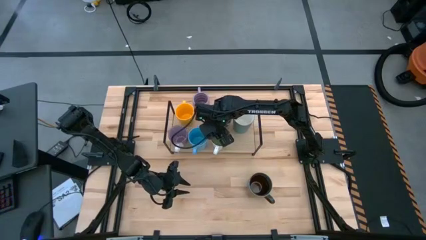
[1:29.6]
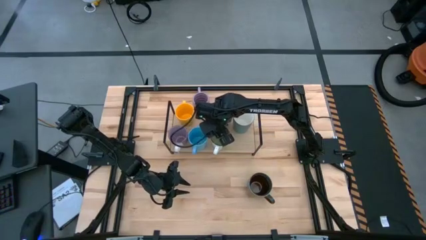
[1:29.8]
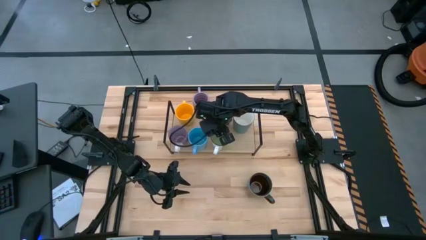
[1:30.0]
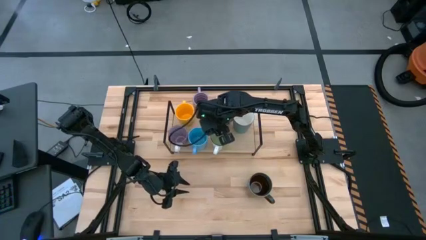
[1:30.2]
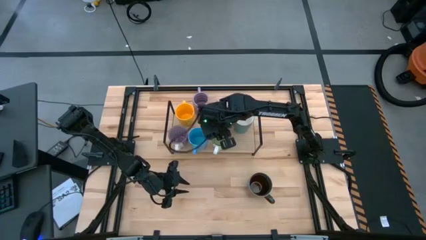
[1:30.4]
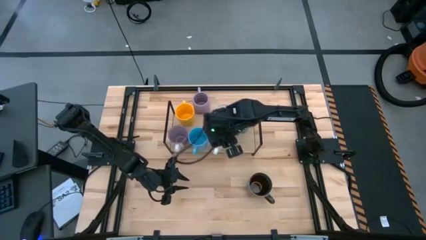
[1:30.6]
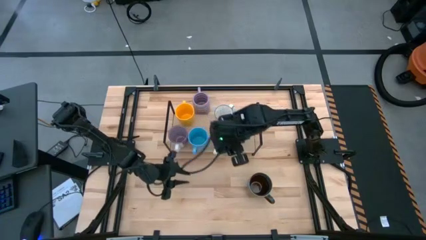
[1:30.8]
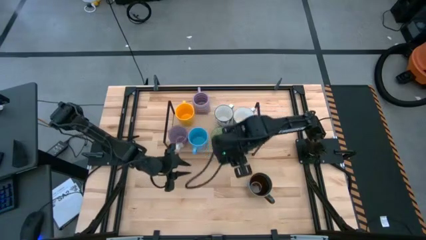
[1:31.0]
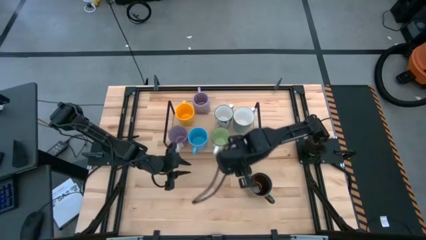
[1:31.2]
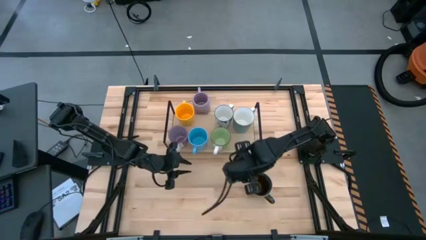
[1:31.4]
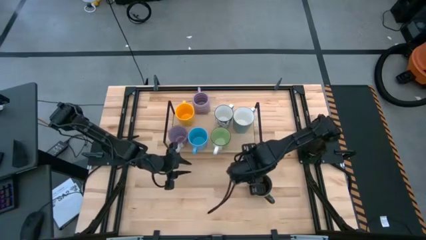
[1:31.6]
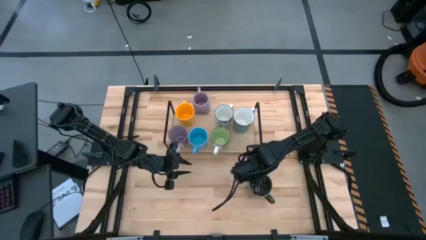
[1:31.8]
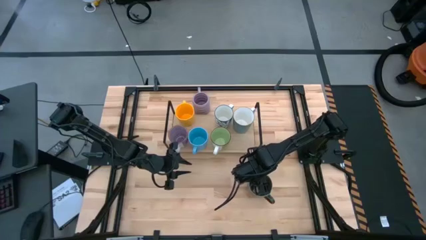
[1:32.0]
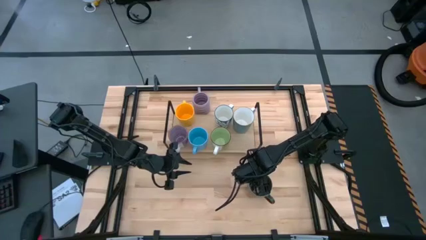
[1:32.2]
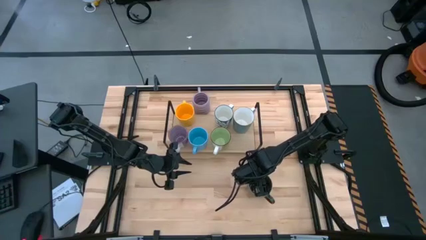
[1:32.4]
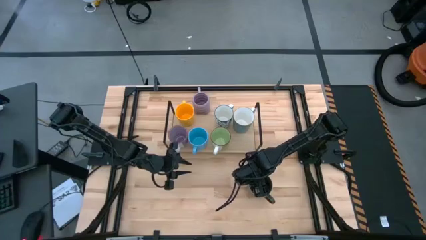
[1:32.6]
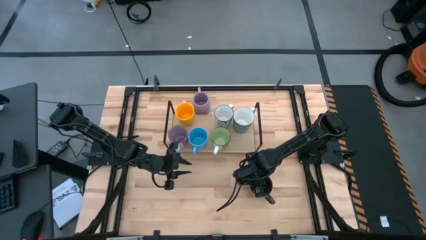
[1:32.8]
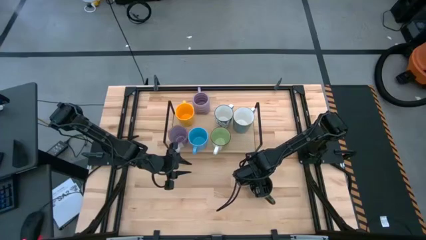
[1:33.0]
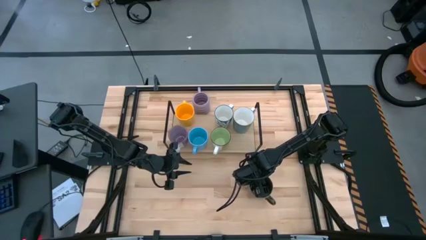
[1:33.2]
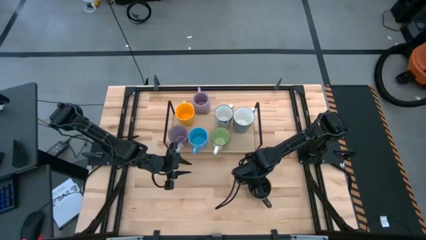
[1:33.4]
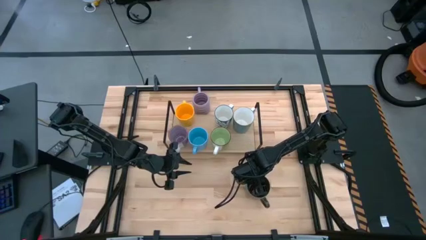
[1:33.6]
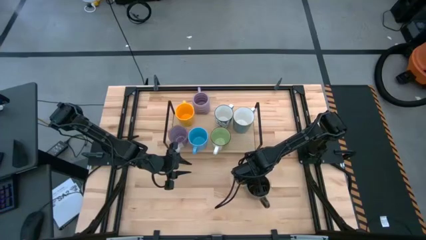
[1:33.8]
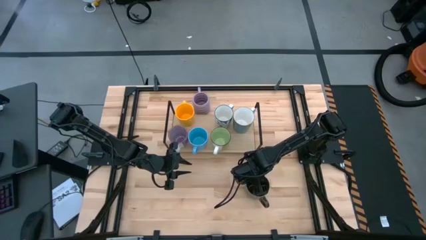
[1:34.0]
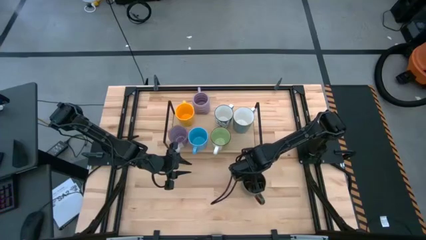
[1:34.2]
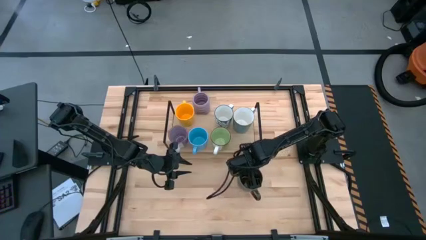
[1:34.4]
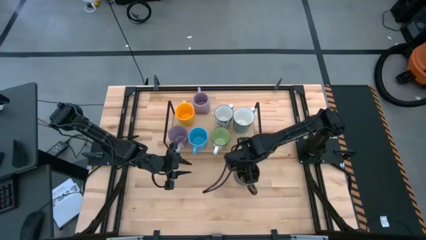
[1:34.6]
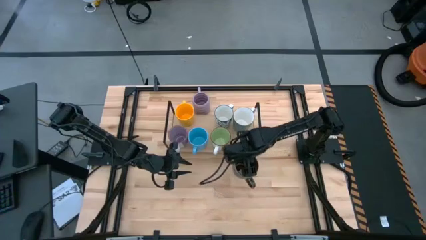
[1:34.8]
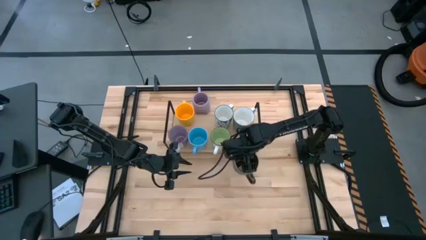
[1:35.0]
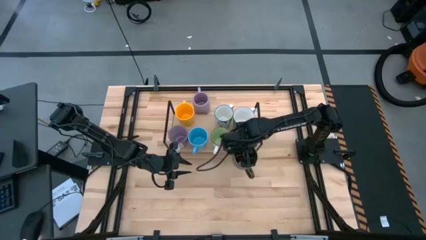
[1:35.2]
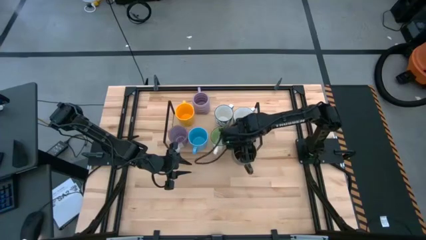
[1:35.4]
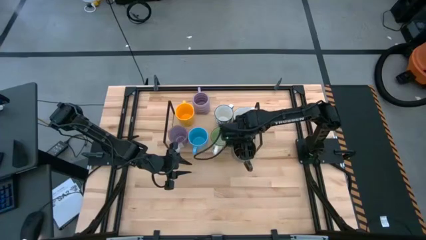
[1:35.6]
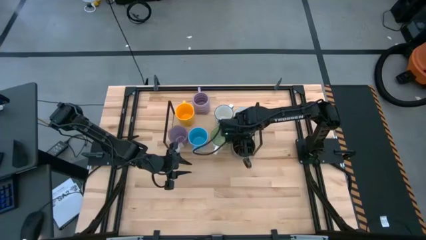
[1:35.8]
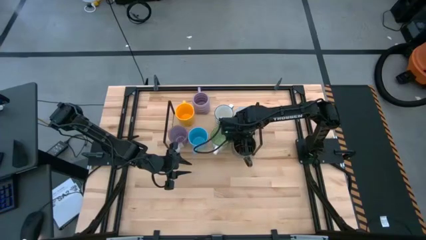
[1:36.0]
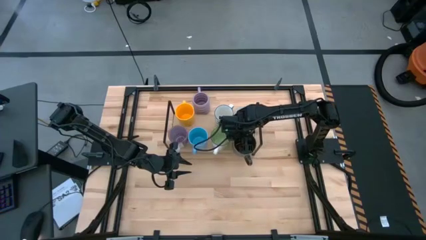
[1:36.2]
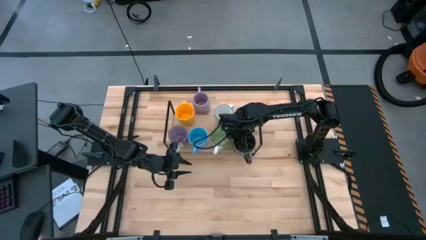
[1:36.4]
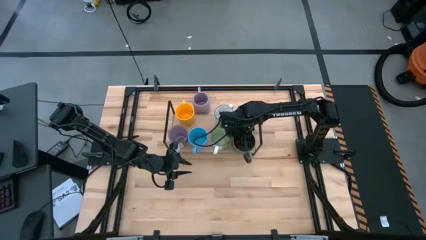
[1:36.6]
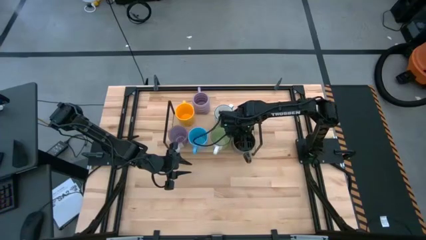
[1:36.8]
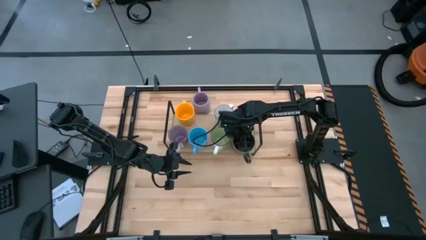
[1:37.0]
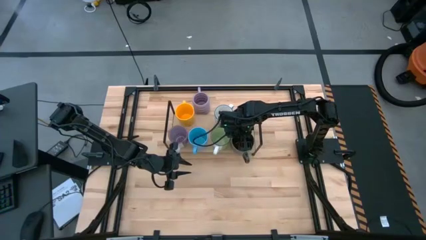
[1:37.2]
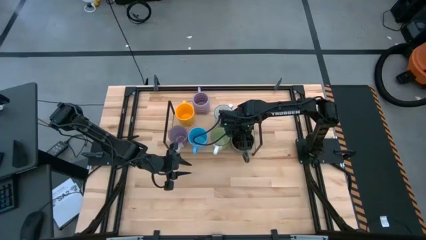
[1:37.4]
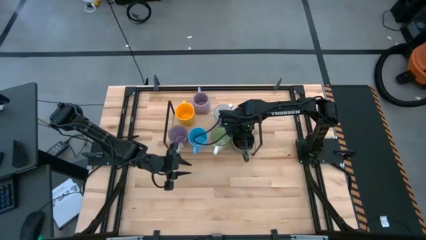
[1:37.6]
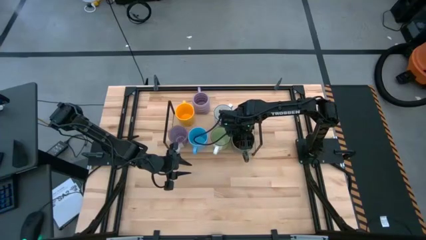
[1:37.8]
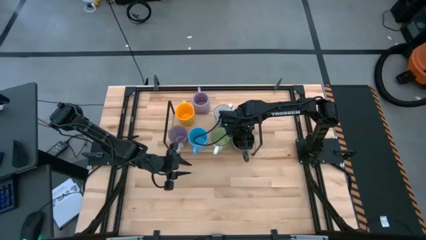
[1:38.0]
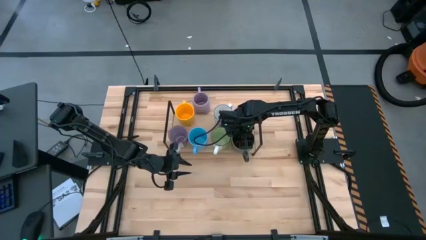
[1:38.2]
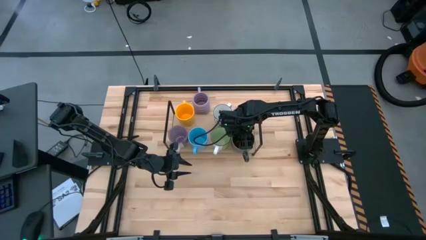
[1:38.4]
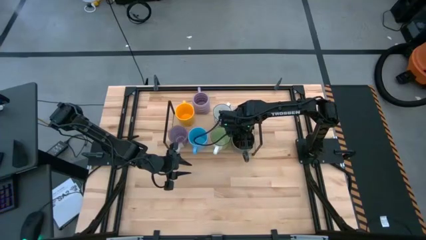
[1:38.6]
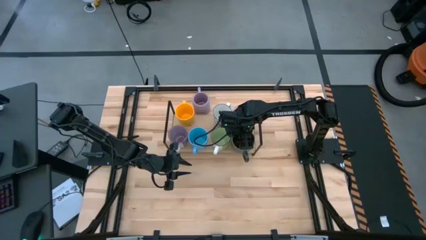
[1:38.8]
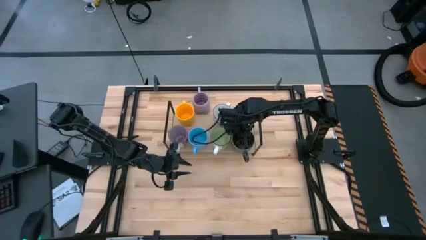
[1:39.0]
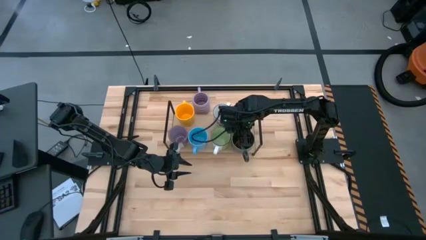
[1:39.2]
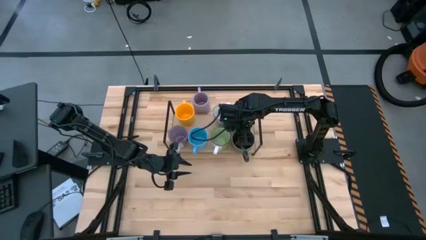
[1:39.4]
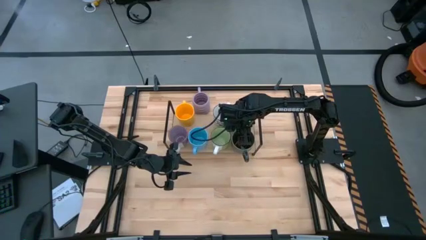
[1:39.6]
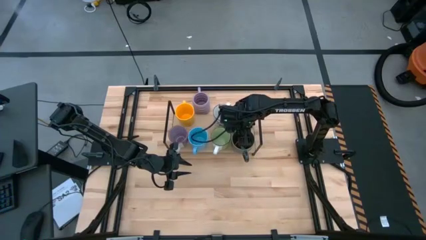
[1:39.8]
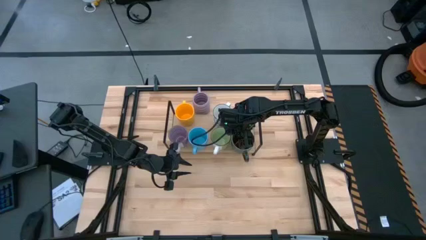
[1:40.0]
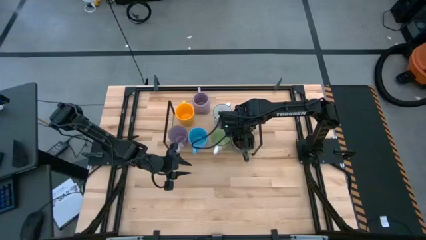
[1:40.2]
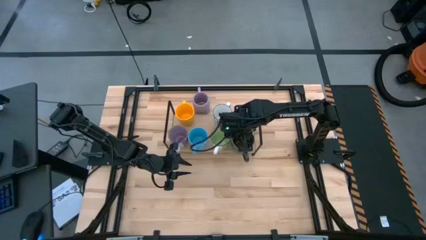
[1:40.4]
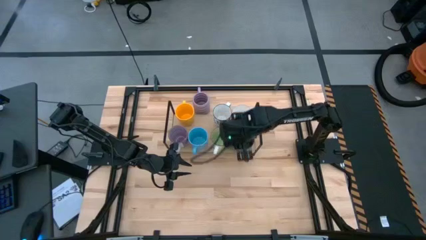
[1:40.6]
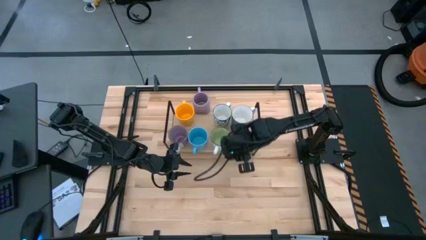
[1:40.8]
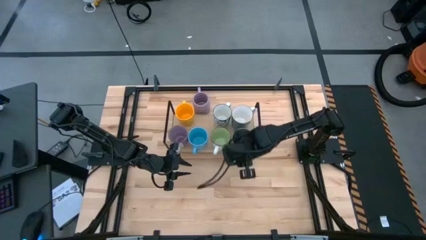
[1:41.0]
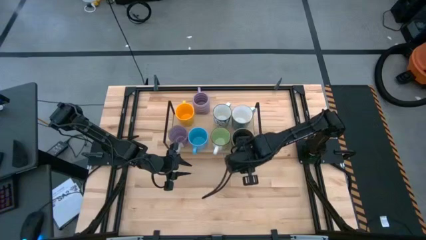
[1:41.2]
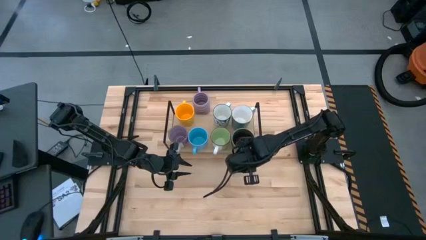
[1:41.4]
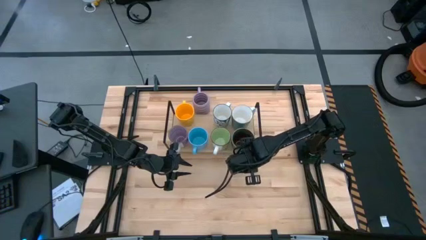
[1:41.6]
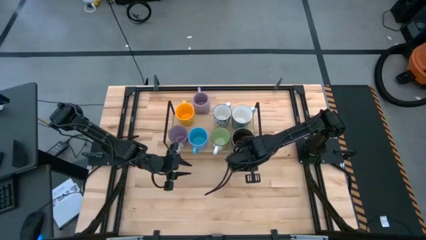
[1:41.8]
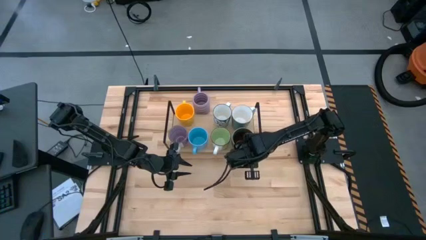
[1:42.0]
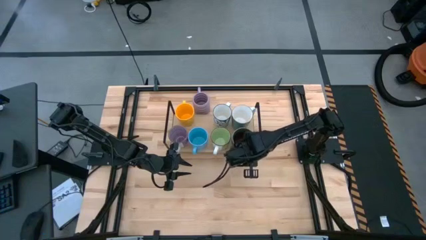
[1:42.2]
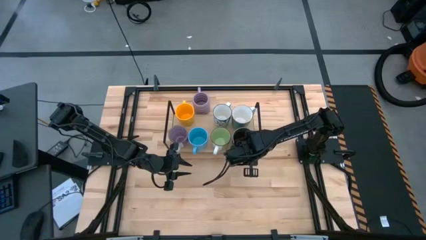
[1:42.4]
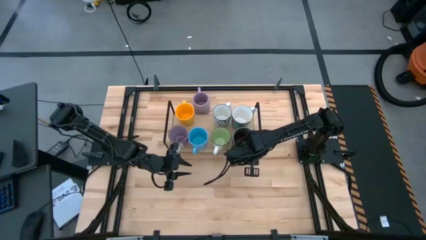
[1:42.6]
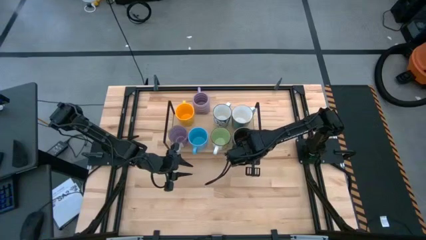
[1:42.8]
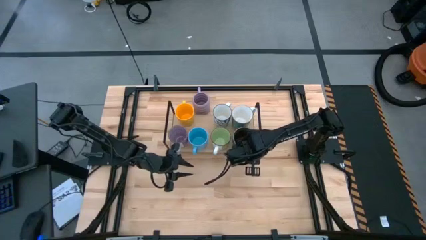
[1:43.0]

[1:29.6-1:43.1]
Task: Place coffee mugs
Put the brown mug on the shelf

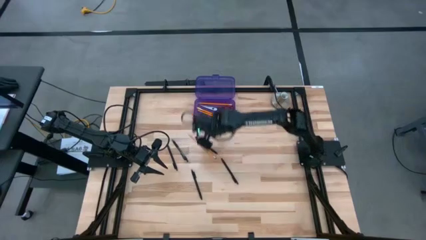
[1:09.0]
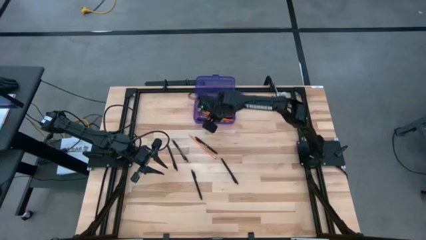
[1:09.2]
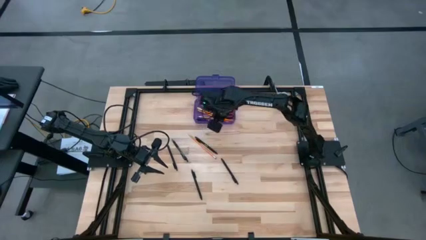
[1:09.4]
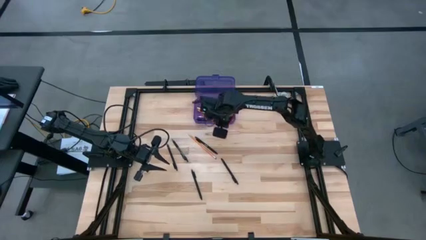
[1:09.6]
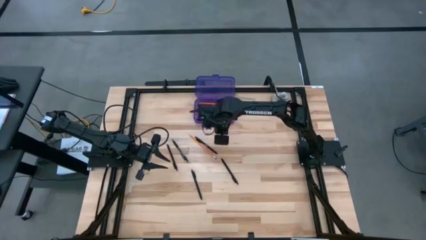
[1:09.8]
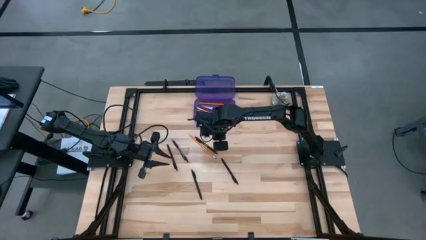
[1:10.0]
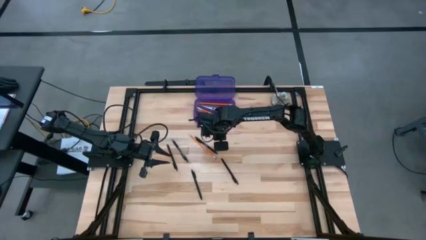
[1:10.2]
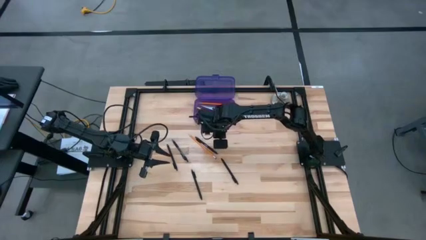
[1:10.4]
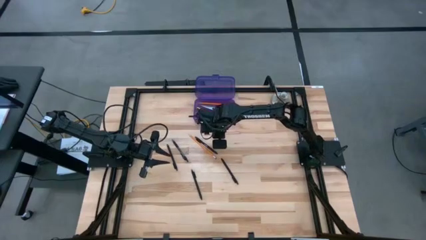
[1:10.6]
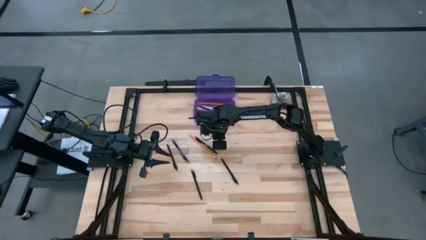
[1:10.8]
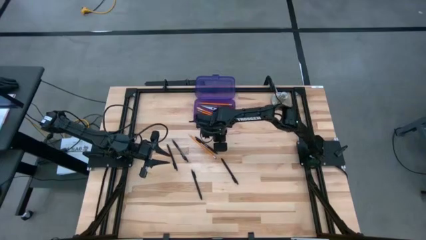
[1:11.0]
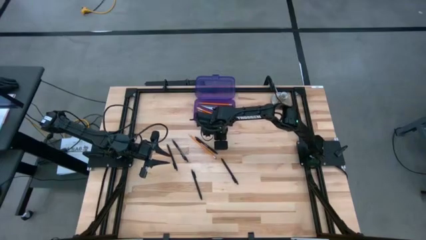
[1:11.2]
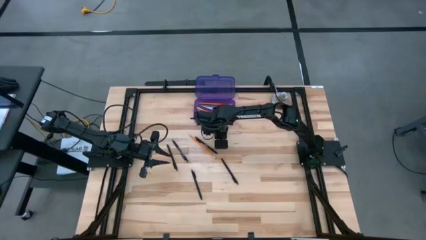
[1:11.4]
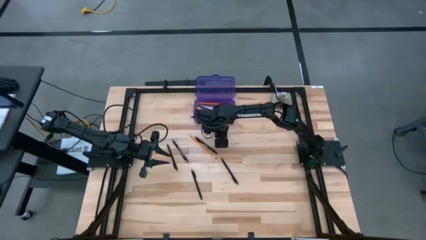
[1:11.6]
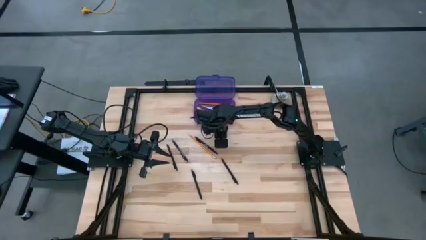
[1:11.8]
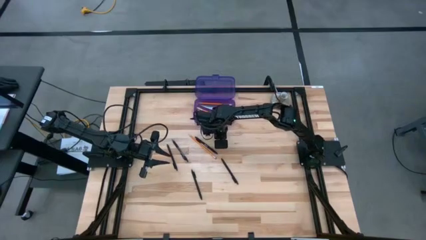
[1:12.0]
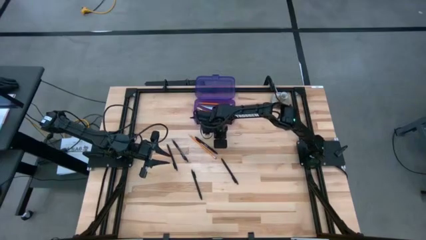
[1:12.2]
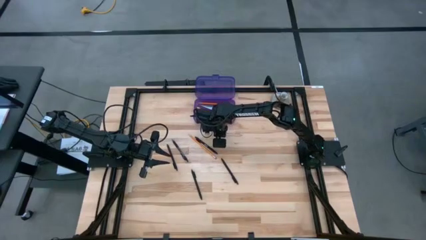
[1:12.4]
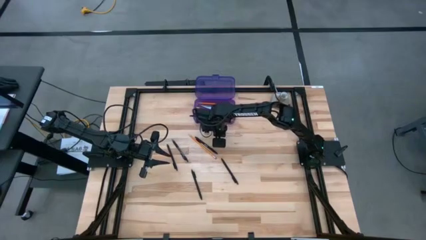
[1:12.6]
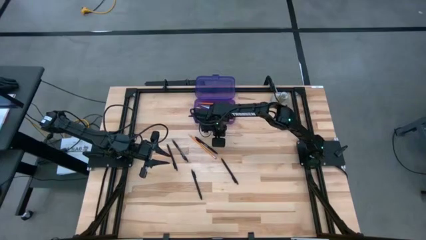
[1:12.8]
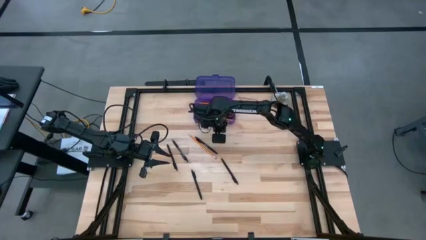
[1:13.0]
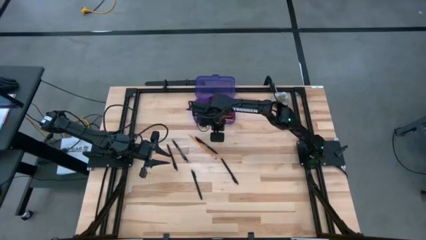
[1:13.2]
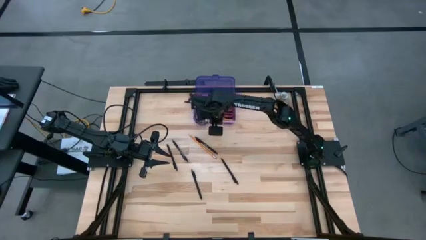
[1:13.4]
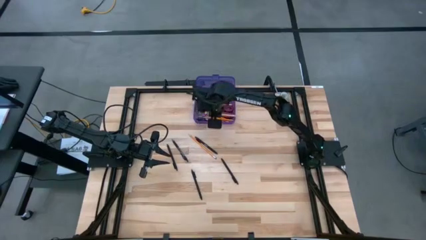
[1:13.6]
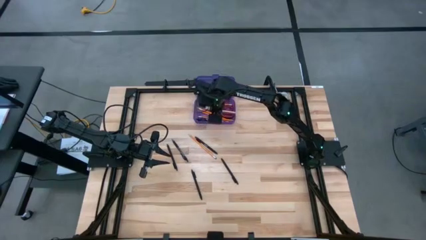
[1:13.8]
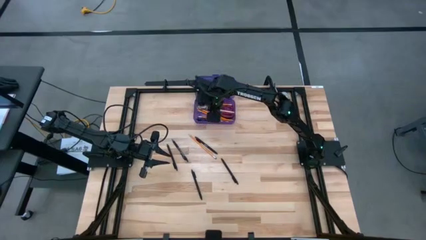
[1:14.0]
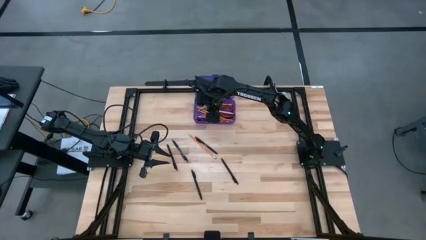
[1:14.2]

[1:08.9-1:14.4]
Task: Pick & place school supplies into a supply box
Put the brown pencil into the violet supply box
